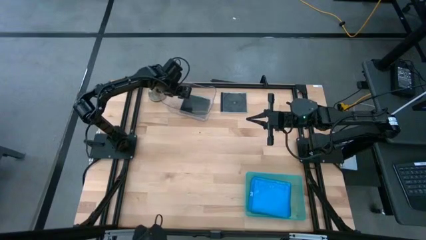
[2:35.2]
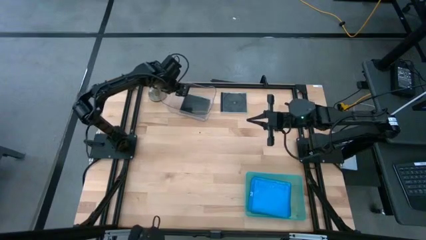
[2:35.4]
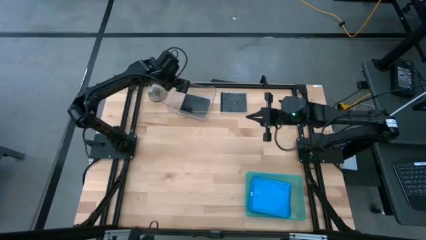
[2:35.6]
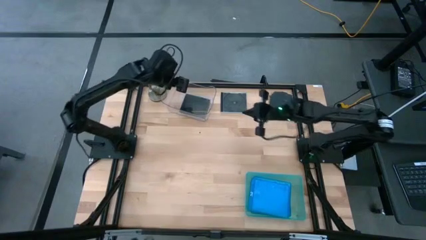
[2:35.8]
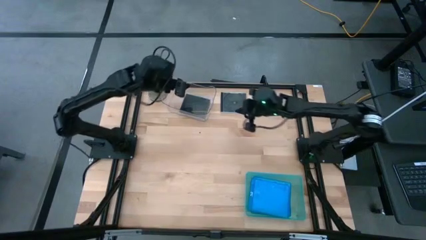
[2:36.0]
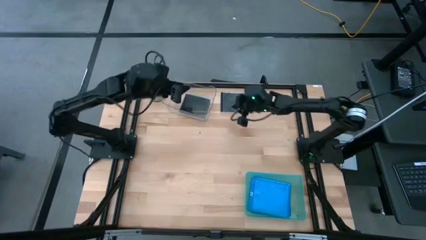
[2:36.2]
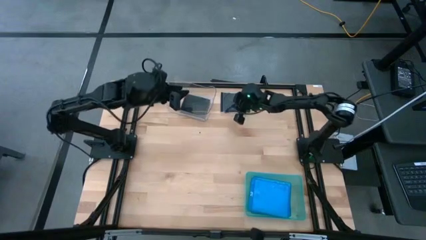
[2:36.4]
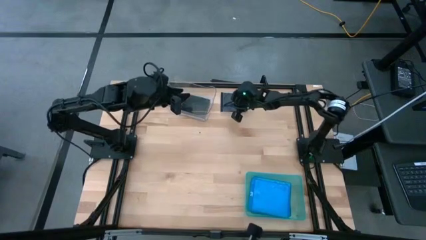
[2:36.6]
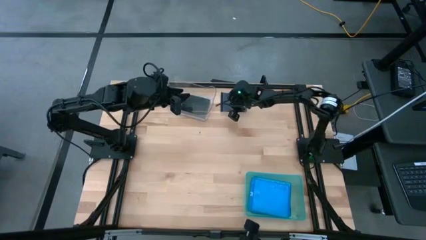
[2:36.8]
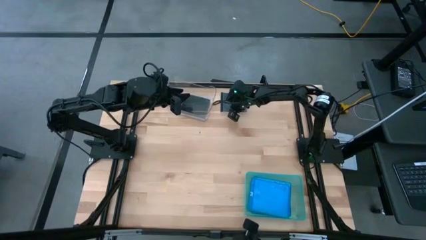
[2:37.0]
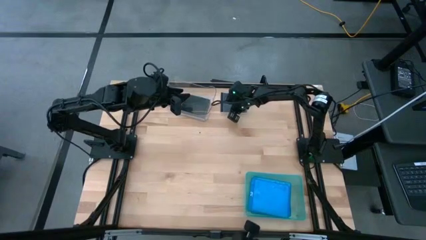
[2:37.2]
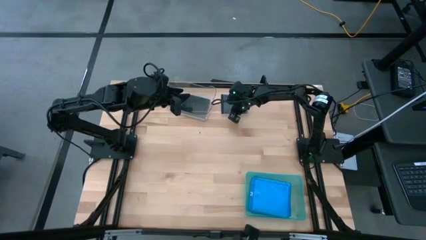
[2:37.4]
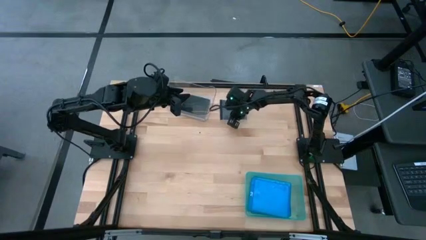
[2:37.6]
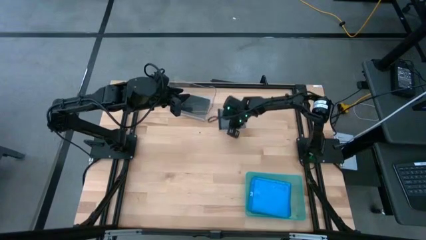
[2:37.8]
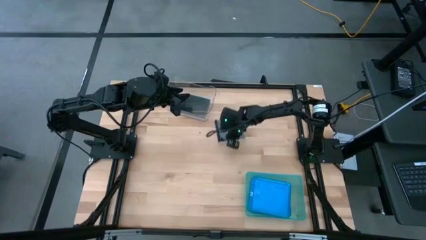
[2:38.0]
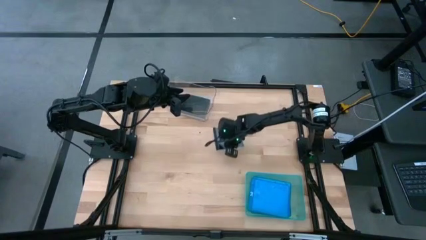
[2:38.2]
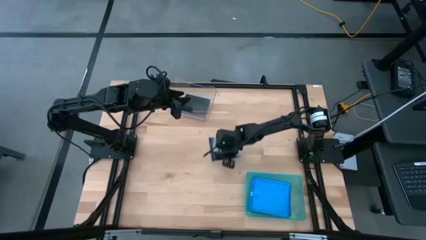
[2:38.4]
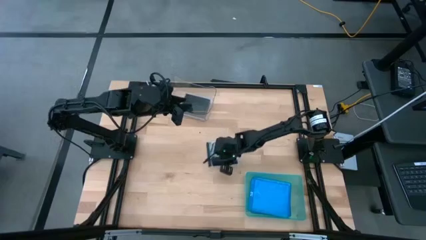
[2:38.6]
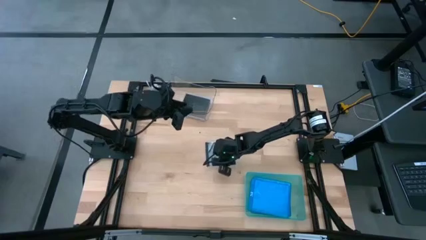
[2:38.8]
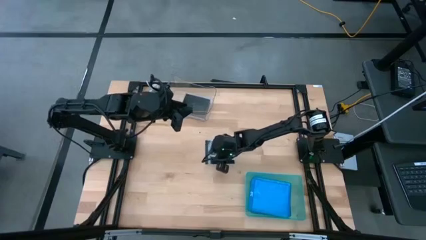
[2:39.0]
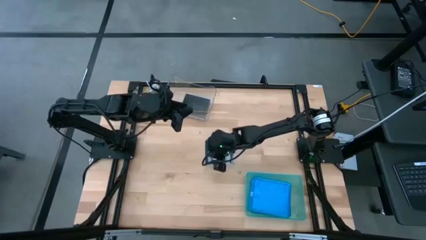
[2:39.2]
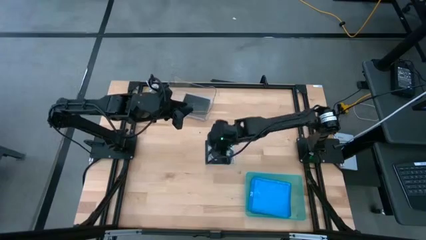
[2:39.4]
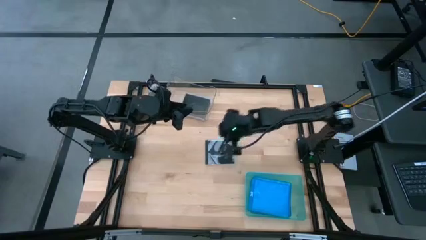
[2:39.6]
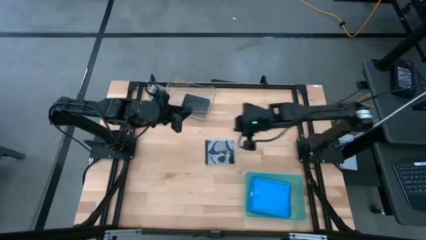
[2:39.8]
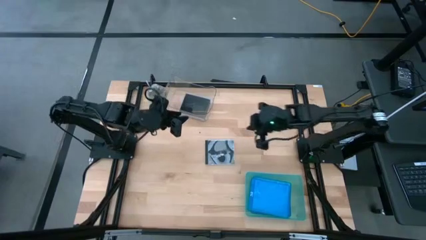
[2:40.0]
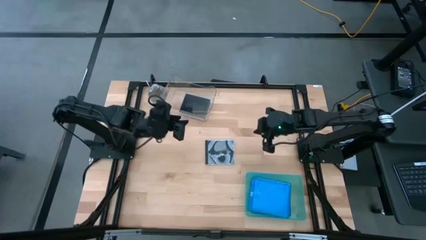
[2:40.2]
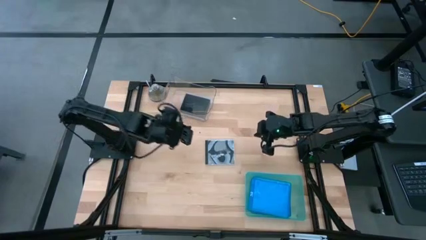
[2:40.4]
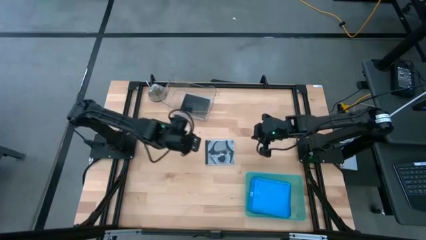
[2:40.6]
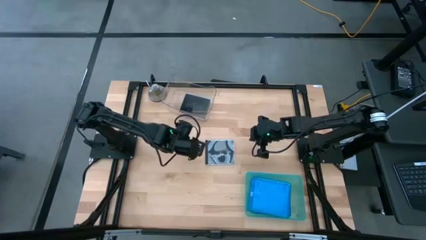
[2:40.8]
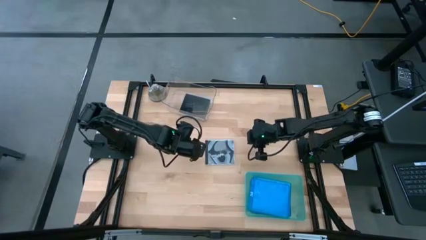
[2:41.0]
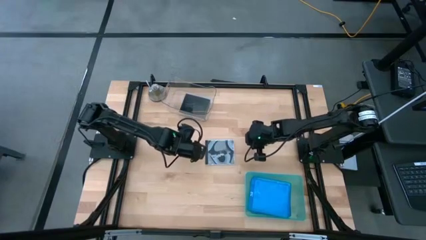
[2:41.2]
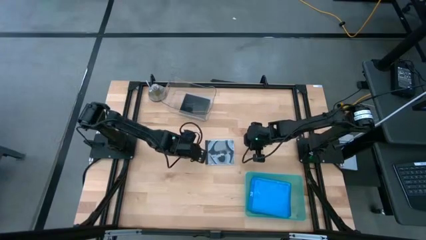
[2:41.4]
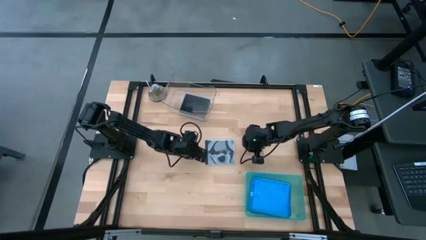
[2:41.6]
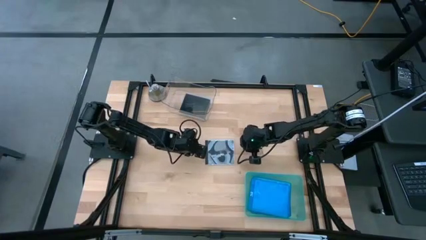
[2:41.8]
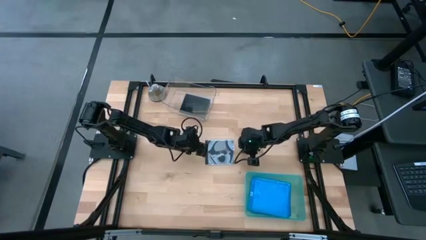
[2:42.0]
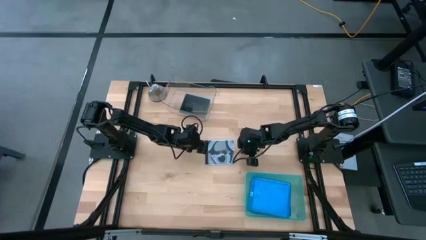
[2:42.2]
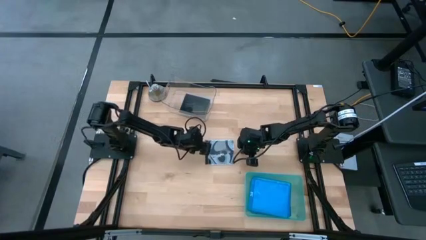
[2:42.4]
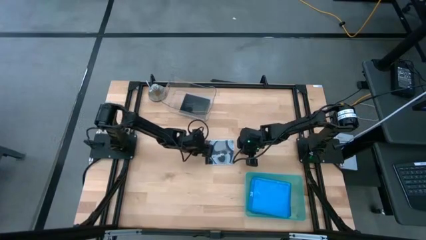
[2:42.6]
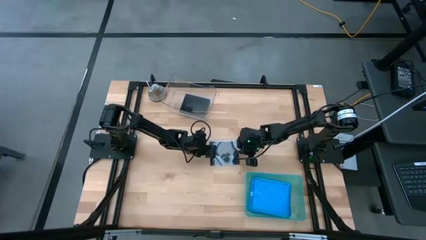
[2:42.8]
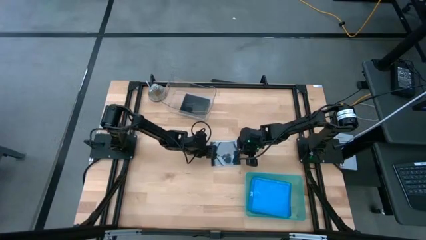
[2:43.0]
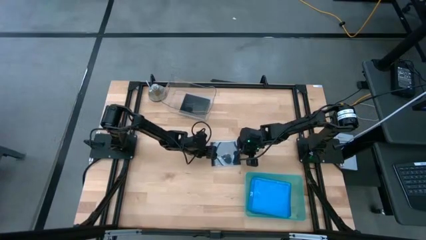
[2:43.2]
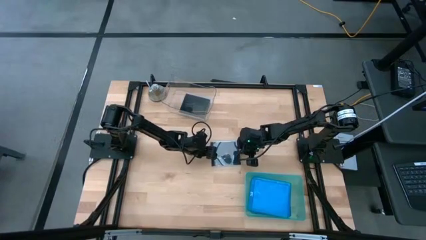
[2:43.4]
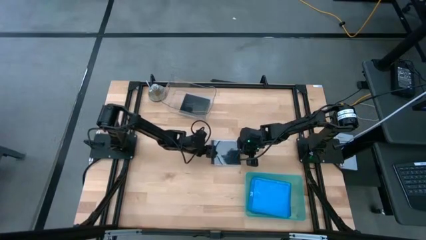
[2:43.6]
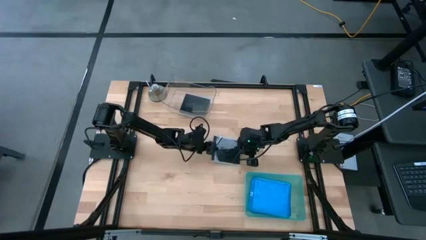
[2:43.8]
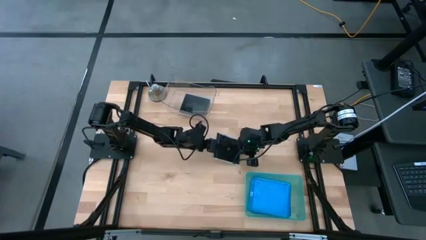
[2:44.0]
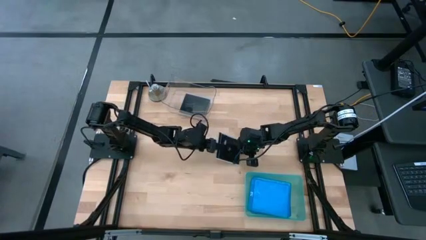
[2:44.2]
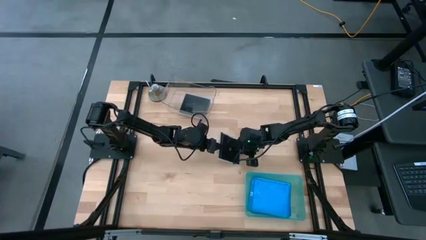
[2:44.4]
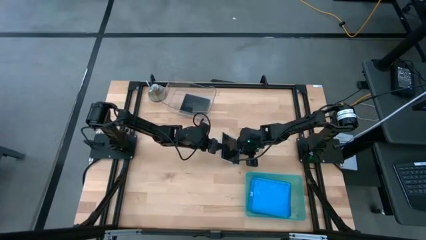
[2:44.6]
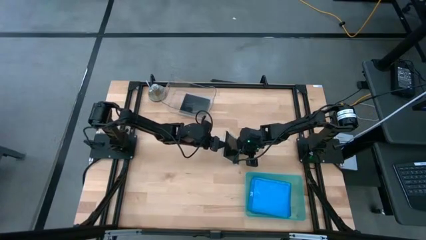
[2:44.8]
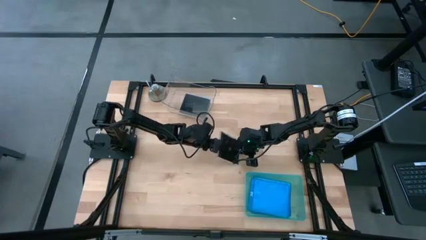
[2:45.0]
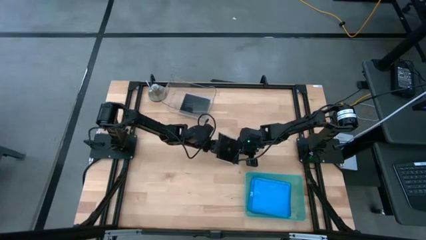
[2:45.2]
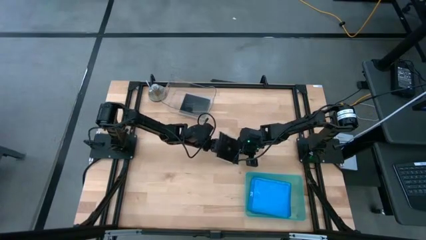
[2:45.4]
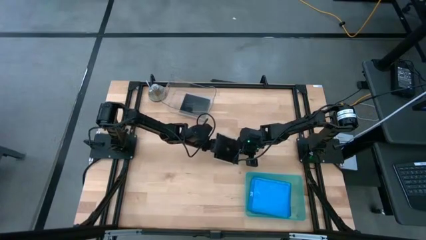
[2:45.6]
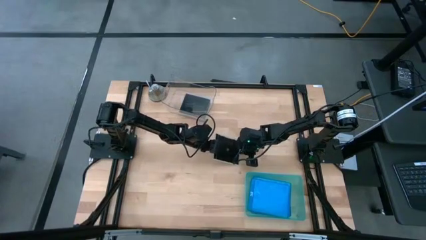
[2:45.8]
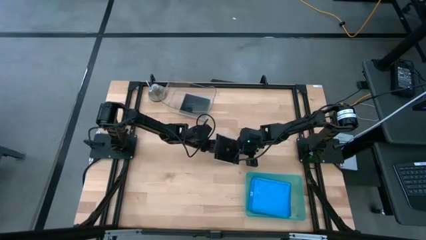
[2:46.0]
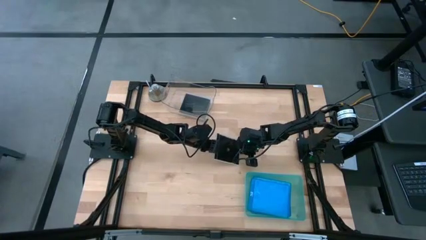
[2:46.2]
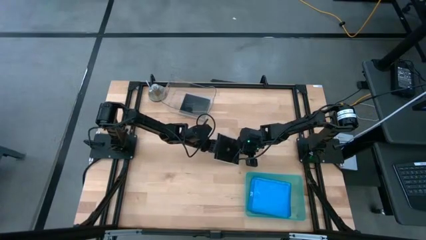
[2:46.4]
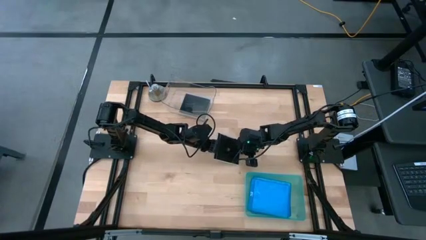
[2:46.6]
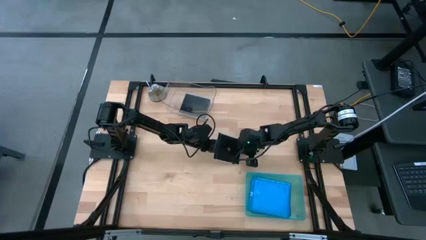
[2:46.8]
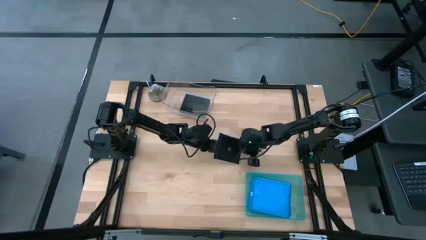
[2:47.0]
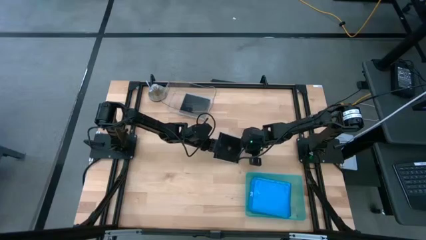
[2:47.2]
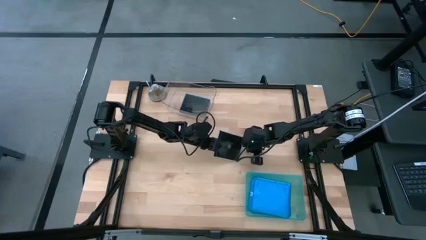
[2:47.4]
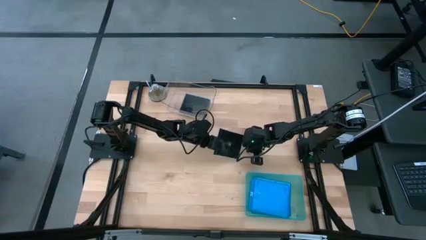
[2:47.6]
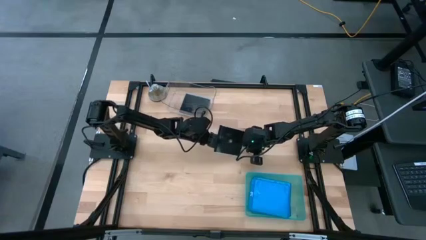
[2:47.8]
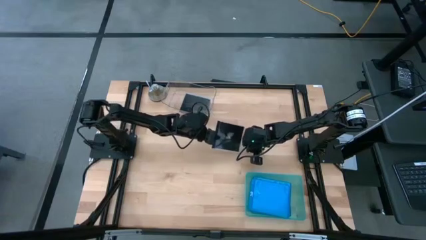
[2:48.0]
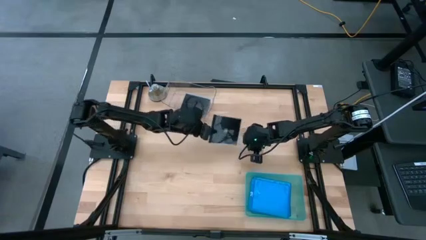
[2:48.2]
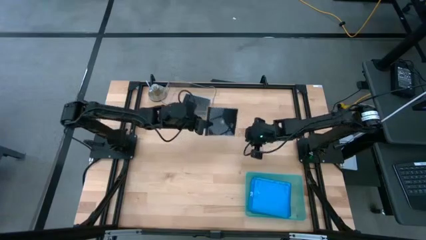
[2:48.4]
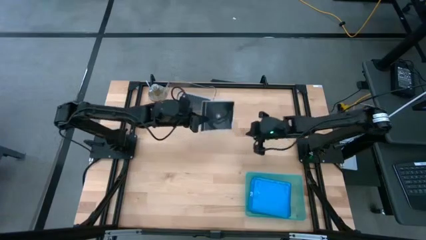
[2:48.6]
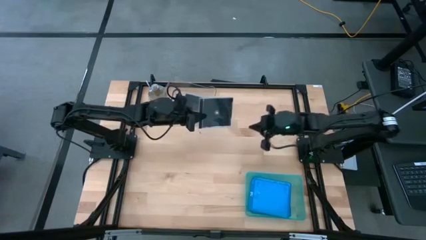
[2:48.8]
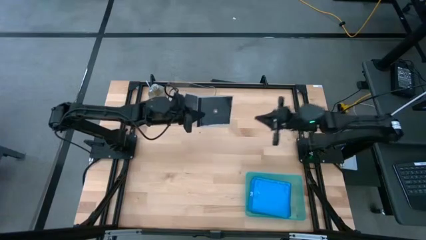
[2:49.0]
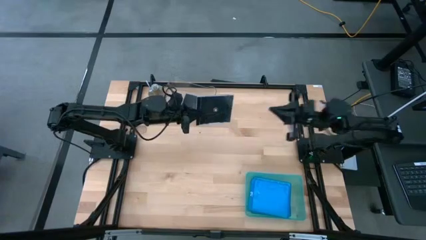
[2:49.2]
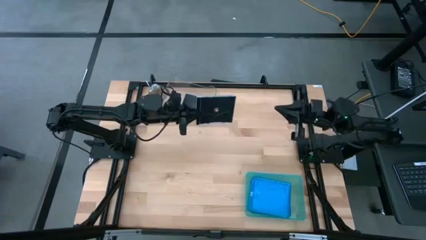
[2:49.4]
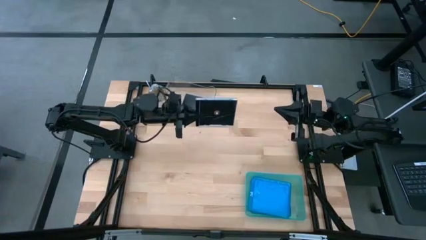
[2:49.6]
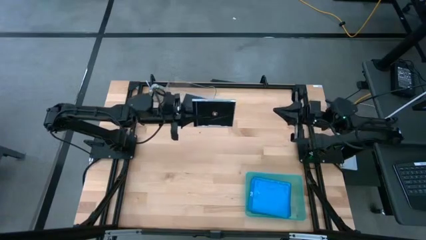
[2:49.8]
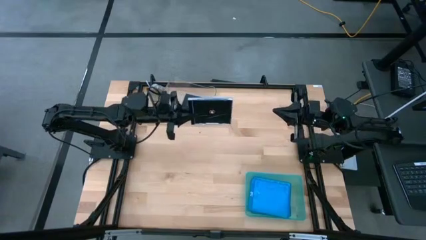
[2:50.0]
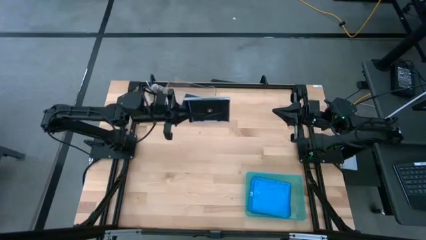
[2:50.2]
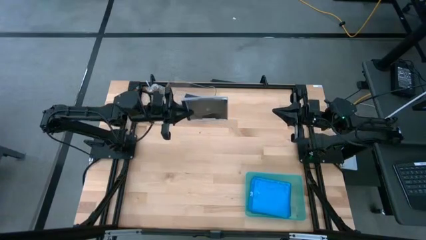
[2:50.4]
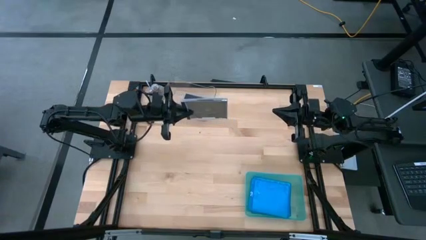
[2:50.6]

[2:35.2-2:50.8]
Task: Pick & place jewel cases by type
Put the black cd case into the transparent bin

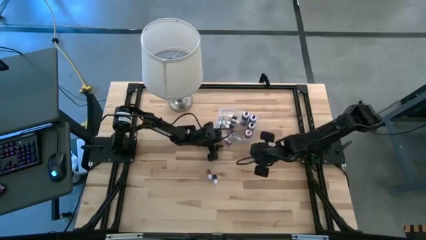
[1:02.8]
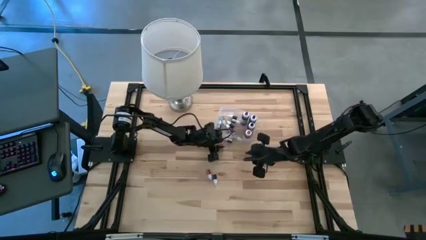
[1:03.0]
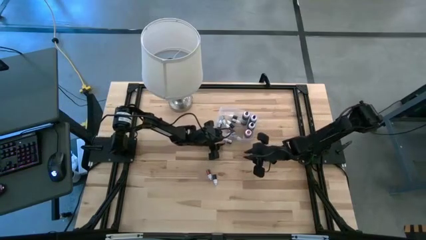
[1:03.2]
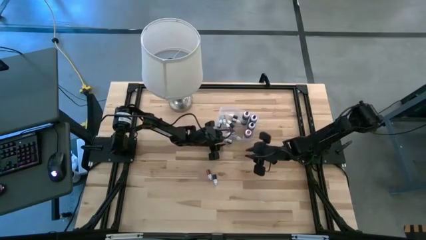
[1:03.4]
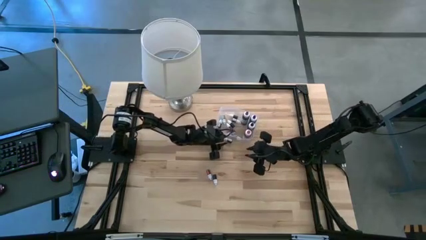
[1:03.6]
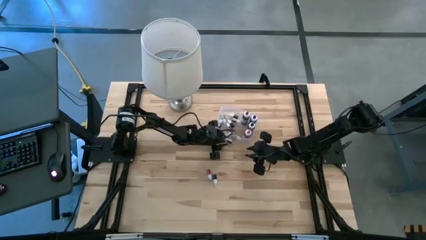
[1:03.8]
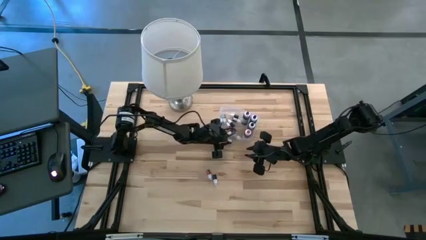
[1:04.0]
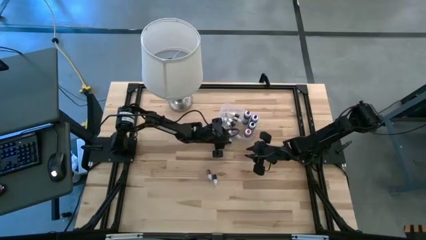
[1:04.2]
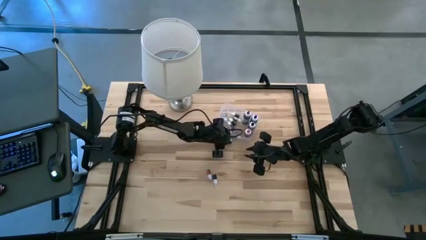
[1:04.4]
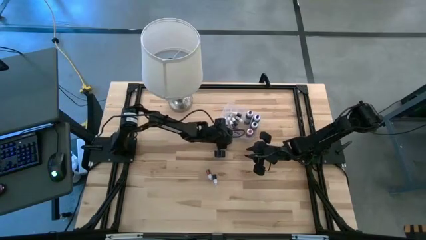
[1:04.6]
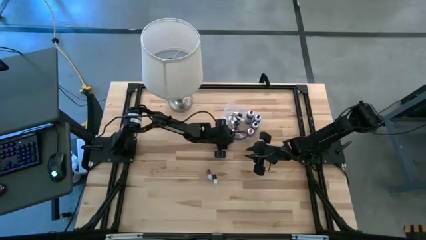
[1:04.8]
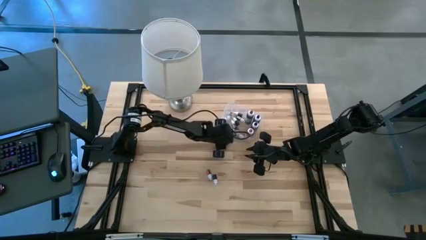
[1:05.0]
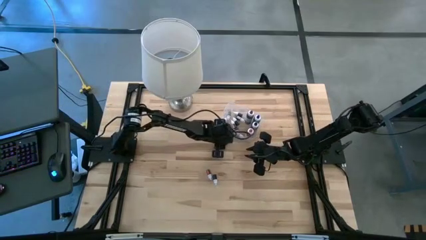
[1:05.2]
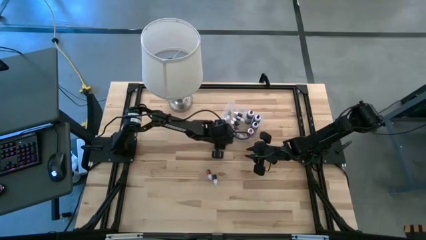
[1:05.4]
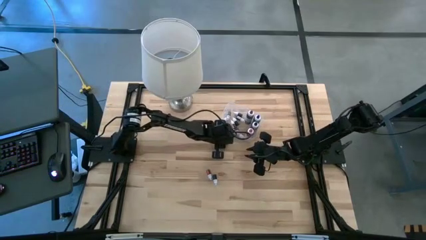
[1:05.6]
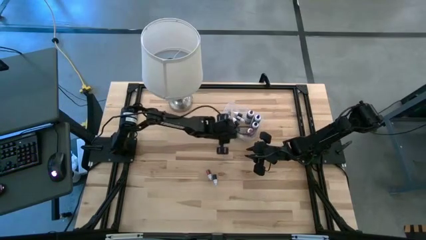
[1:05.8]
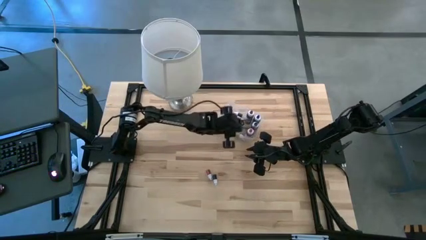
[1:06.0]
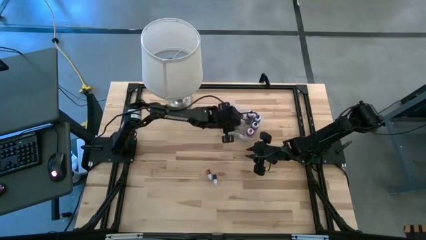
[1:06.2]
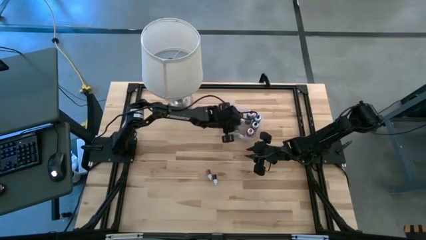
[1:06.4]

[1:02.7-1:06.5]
Task: Pick & Place food coloring
Put the small blue food coloring bottle into the transparent bin
